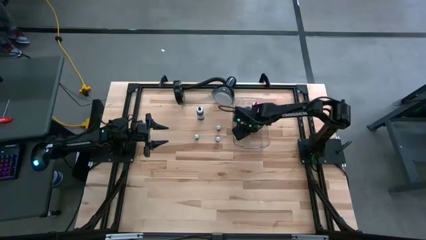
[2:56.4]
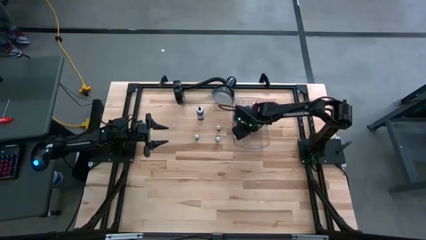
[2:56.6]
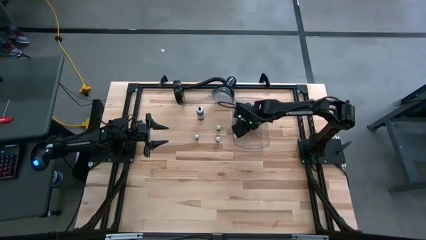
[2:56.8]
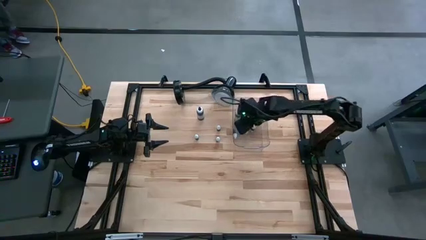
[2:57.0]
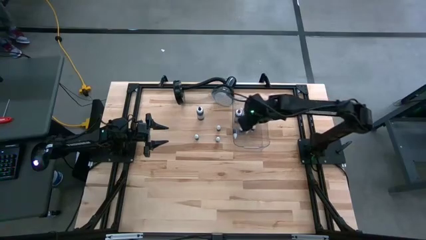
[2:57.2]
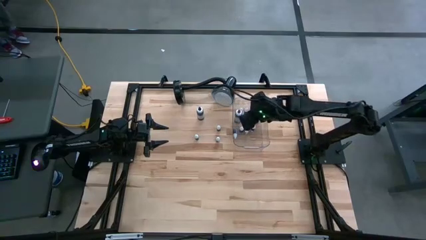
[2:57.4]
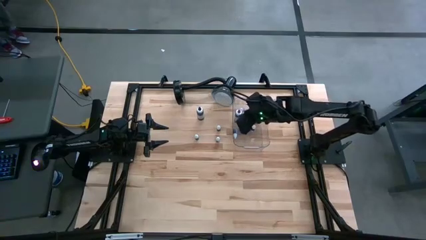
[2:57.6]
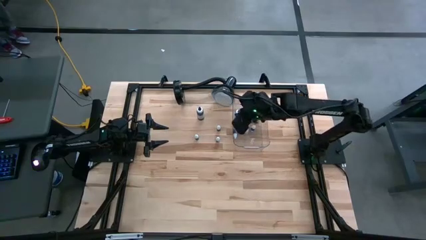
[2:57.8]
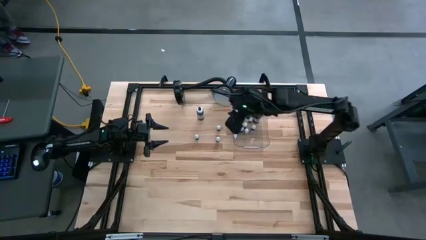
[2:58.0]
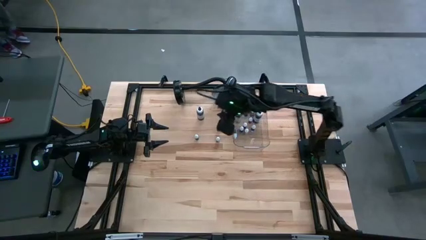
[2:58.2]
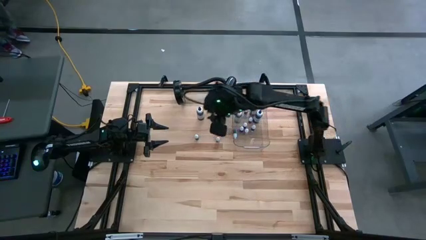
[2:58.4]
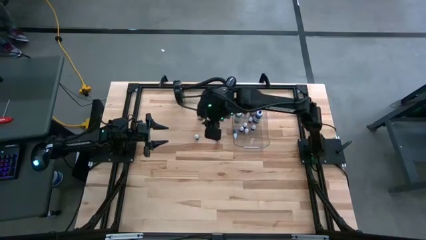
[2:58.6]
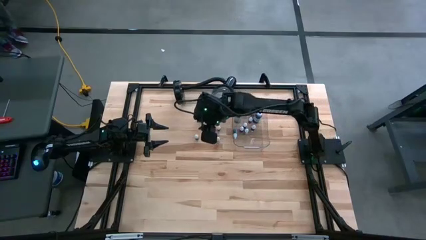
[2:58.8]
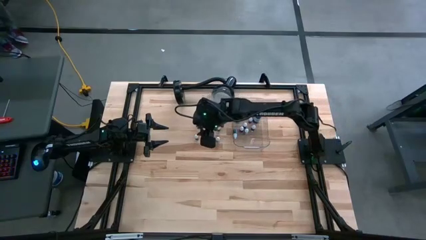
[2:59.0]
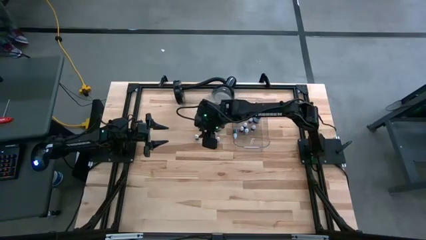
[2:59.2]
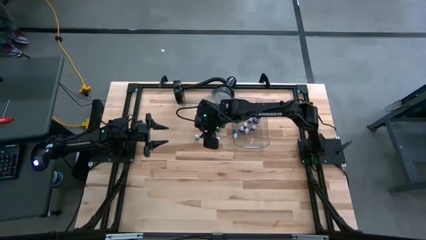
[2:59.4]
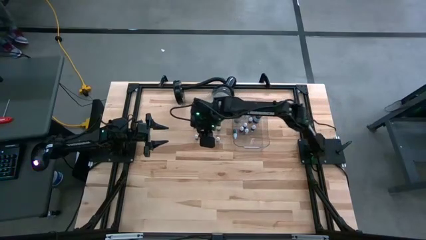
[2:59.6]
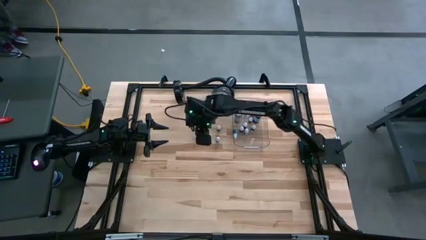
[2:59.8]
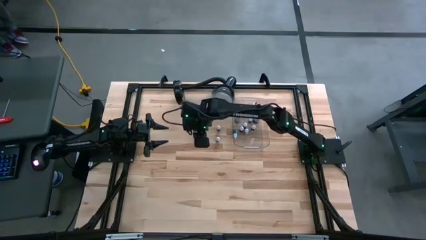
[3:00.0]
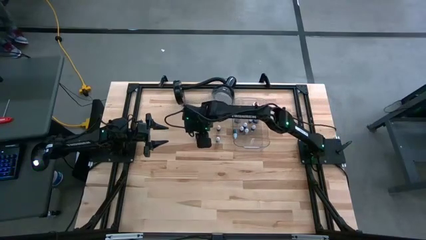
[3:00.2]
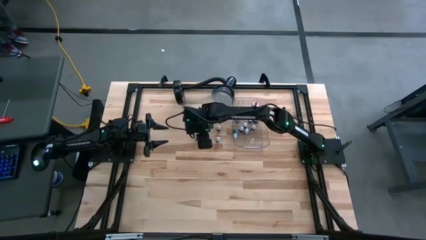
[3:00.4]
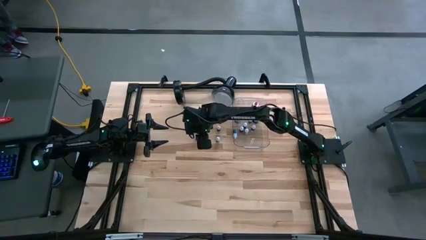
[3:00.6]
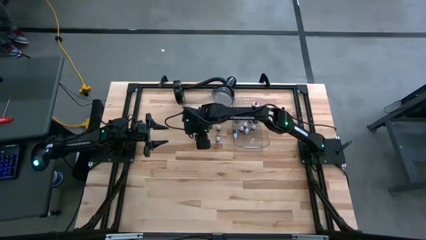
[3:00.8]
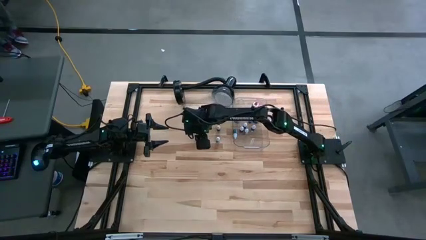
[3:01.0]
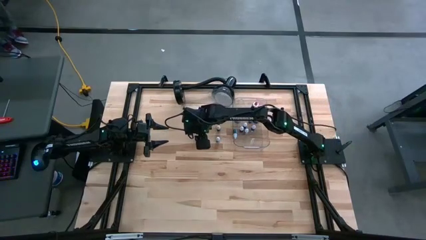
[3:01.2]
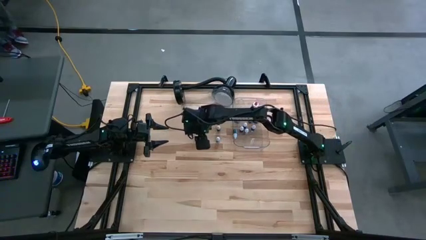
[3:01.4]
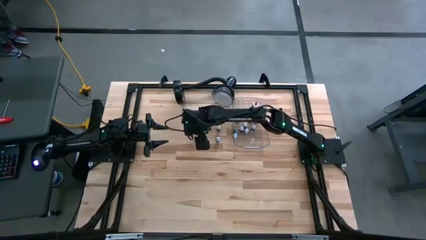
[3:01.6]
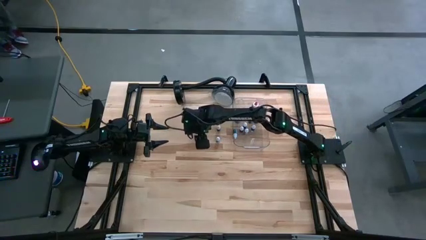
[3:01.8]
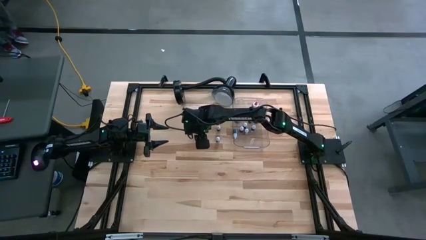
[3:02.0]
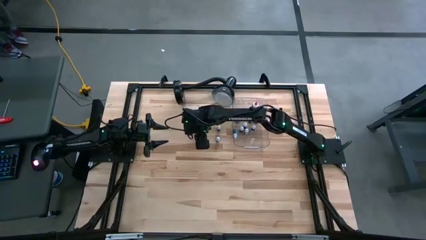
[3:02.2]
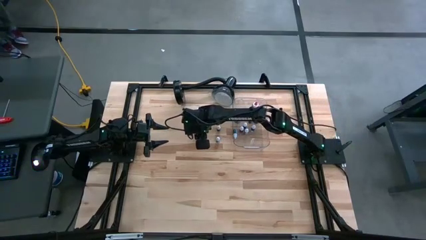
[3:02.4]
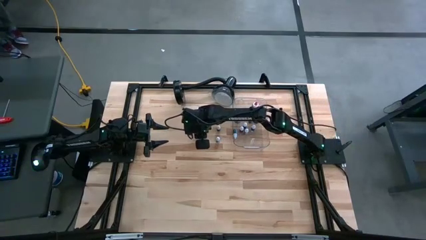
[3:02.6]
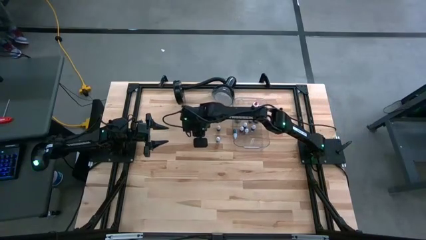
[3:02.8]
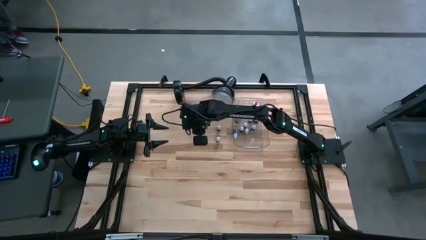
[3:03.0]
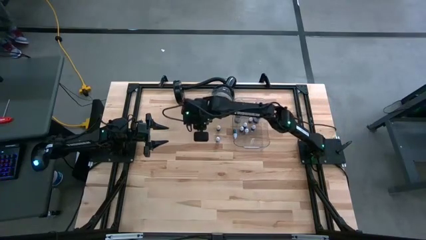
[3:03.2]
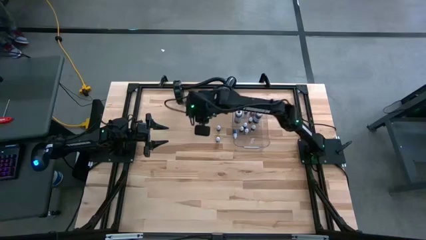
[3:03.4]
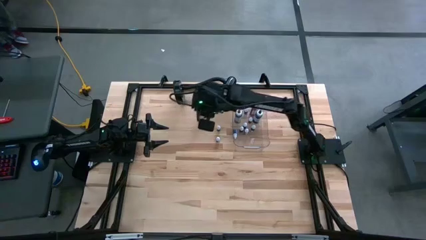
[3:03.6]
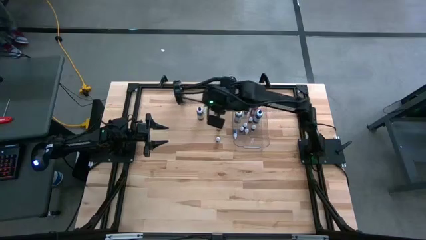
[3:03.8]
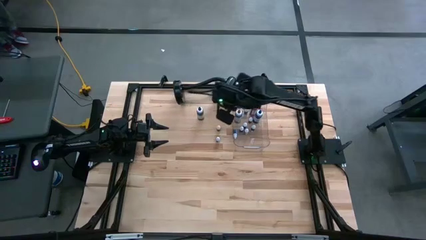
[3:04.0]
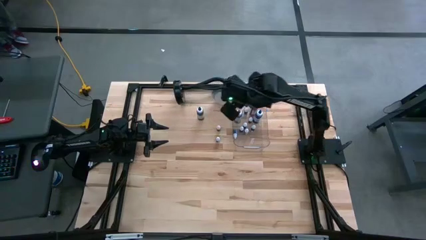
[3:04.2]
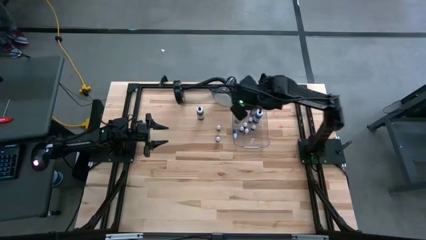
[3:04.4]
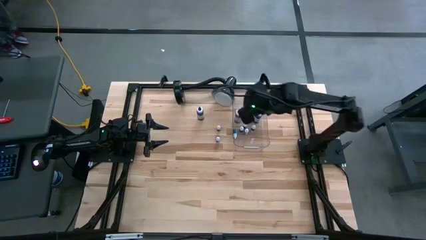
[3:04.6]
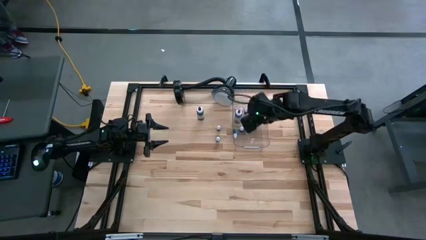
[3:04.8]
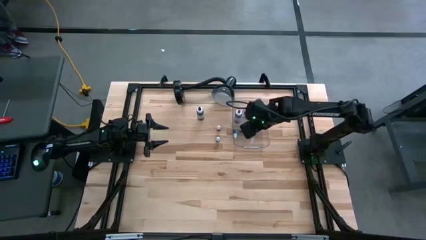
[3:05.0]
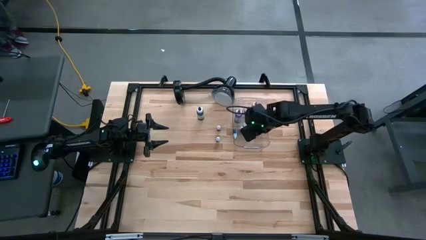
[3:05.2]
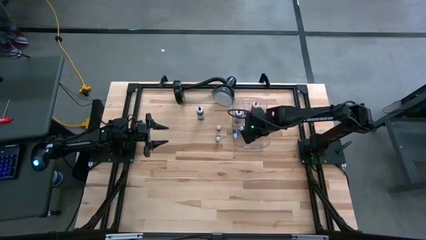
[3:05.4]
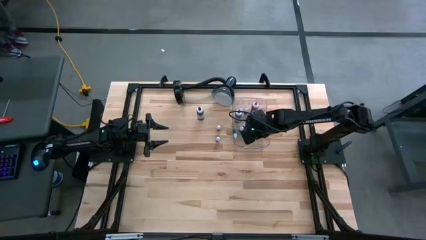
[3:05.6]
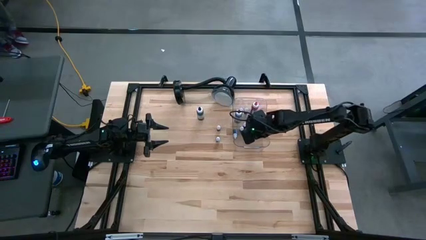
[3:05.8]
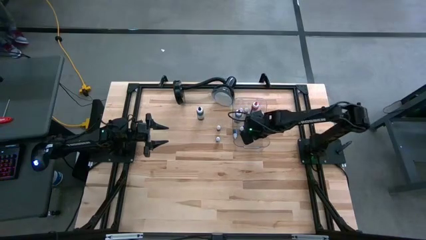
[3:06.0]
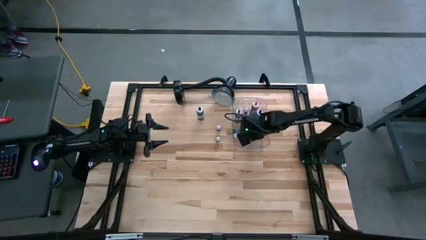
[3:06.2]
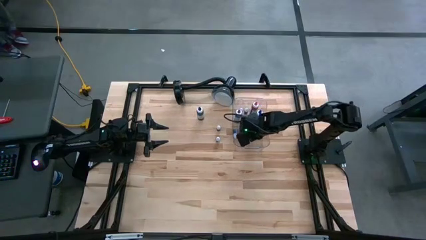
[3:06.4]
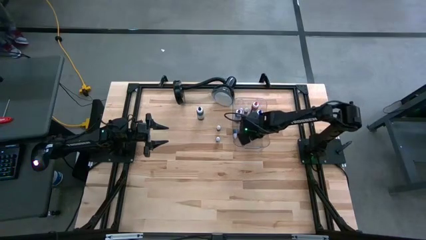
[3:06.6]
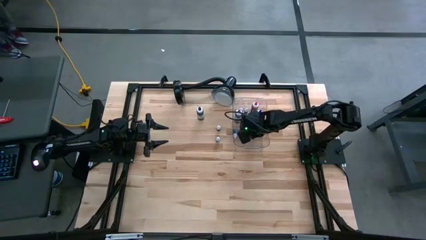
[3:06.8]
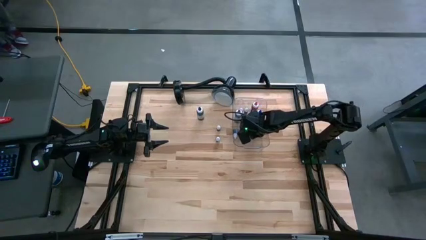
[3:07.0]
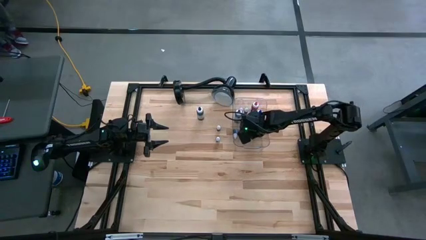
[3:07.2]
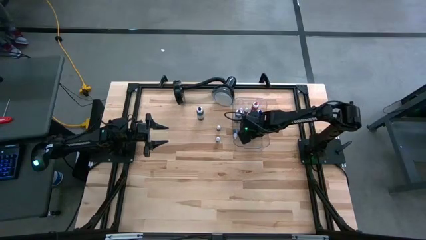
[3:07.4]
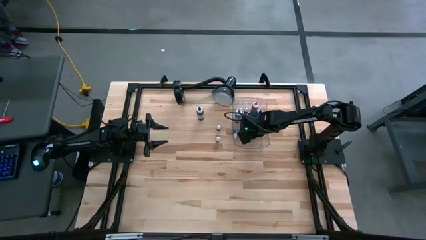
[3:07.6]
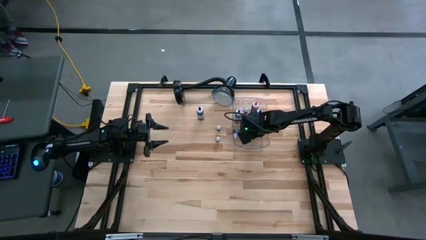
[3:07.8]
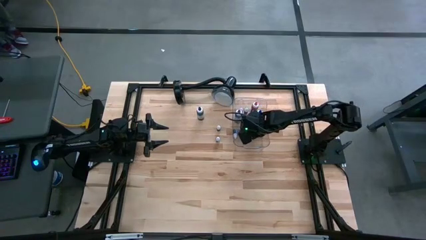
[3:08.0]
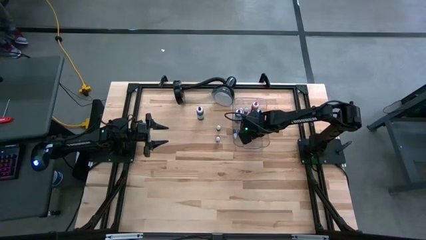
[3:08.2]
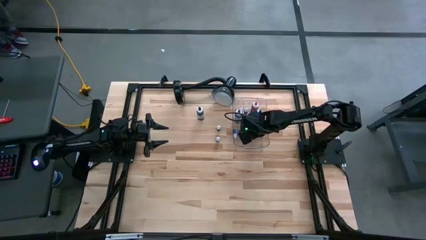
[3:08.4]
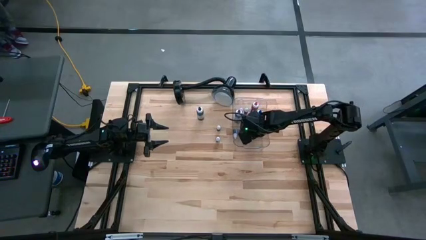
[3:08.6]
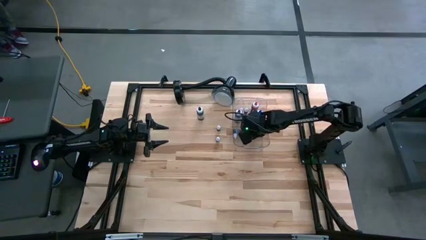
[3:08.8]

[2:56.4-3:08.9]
Task: Pick & Place food coloring
Put the small green food coloring basket into the transparent bin

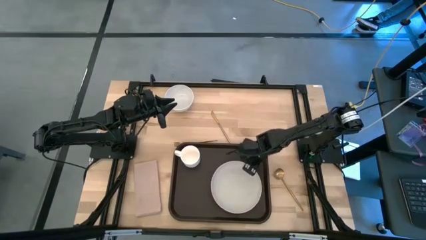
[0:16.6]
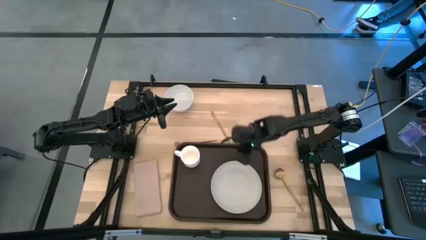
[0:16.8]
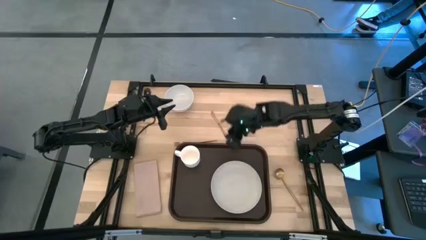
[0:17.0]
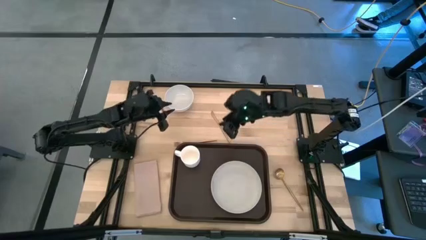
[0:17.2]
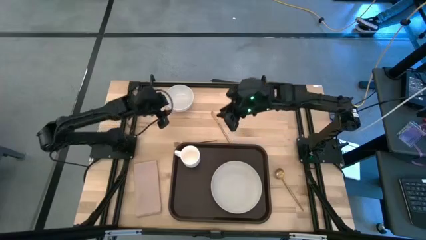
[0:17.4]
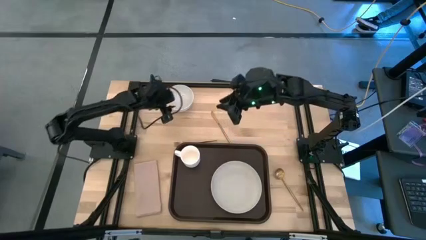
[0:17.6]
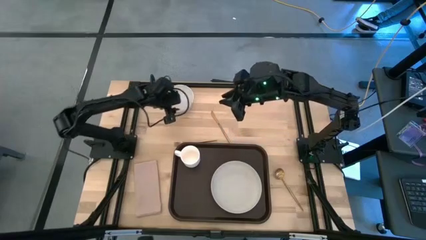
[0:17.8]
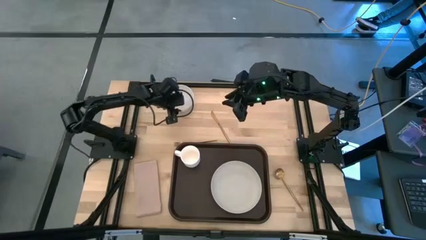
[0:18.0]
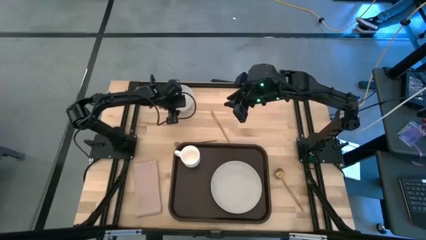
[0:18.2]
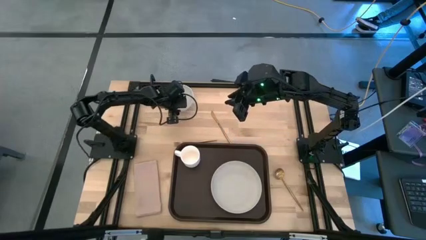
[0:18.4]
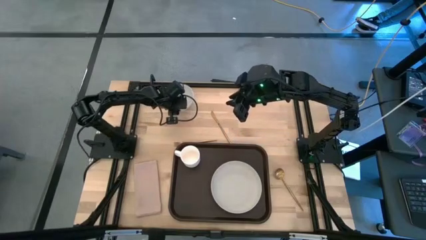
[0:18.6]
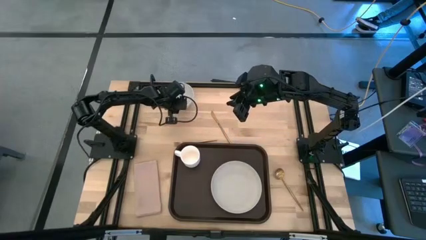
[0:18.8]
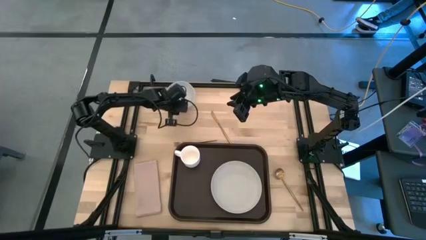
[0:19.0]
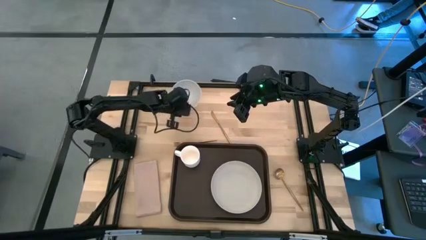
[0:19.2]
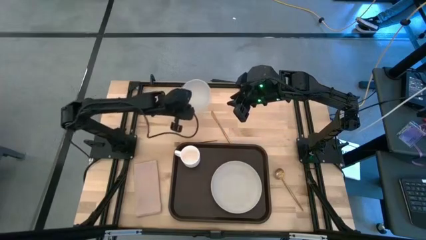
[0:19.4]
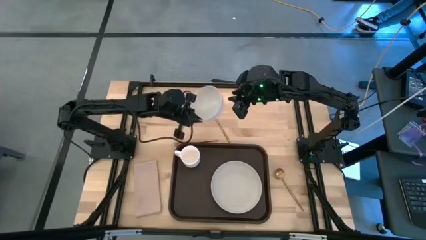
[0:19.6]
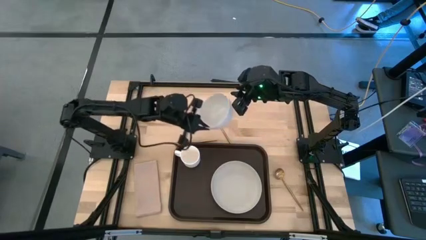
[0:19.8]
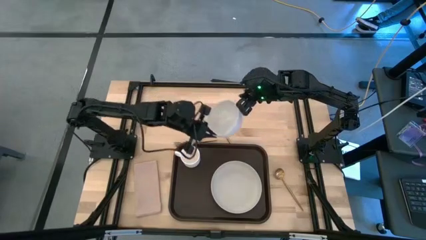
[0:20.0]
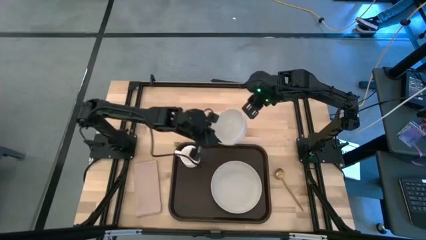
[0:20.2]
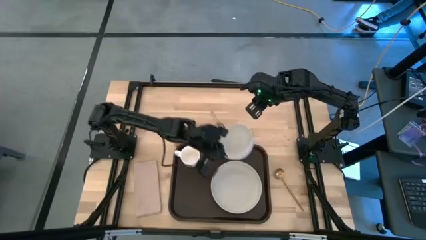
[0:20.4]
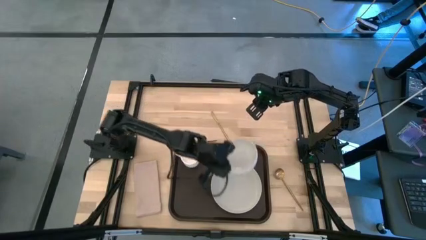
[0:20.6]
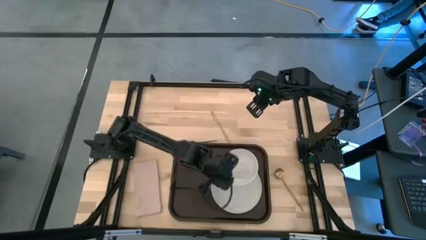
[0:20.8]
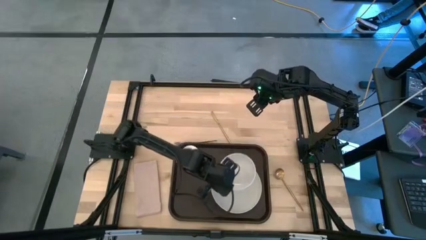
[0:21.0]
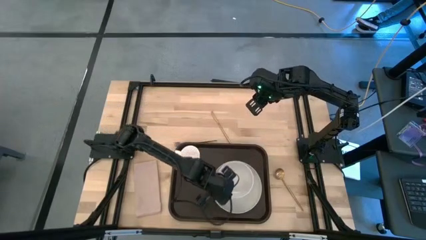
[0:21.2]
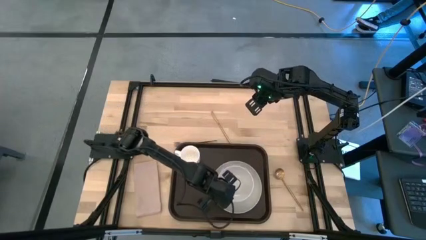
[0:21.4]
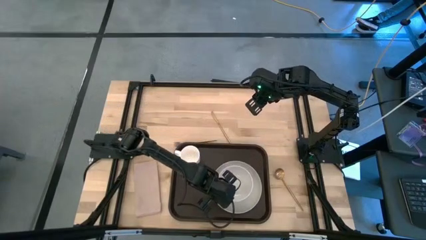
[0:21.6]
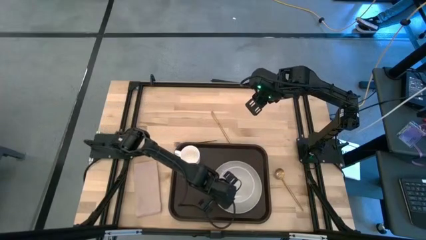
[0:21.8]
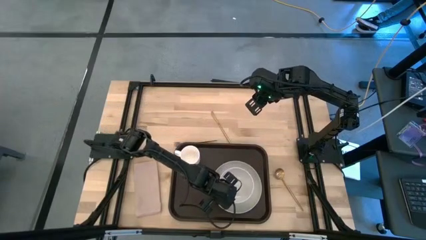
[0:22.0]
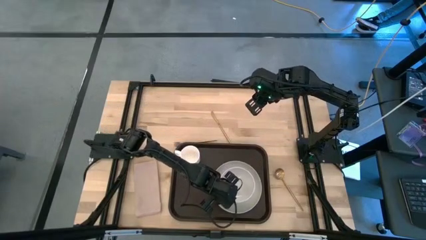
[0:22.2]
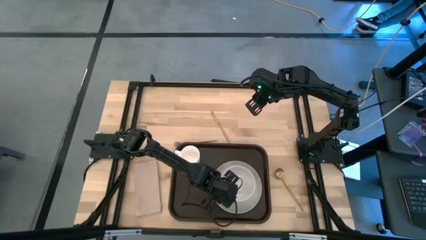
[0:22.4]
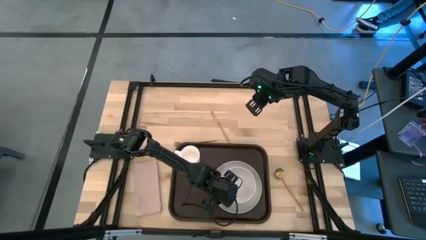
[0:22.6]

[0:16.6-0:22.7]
Task: Set up tray
Put the white bowl on top of the white plate
